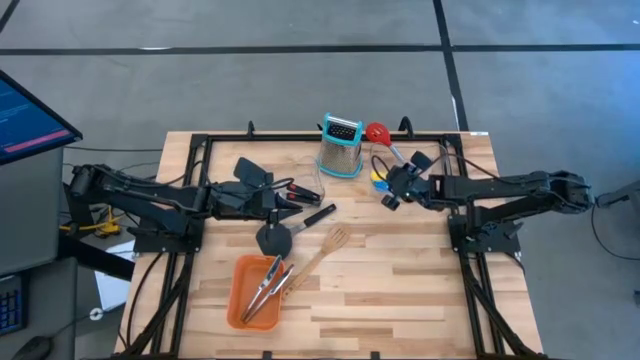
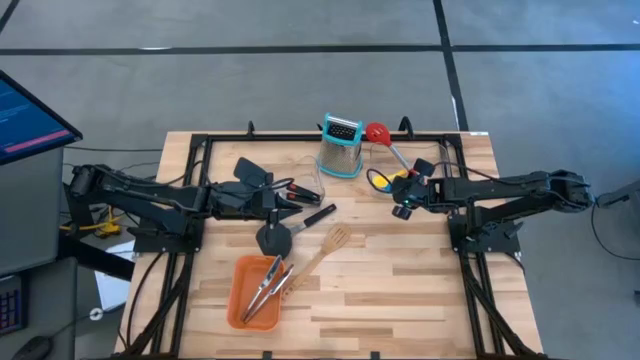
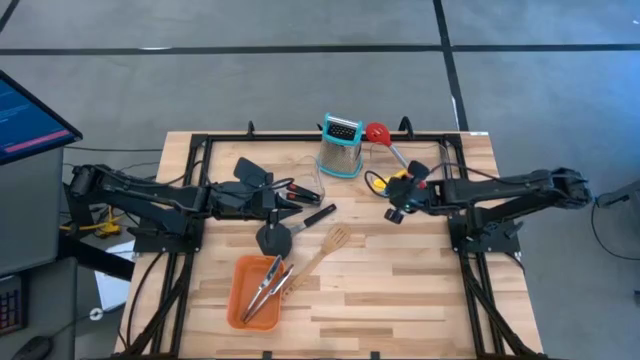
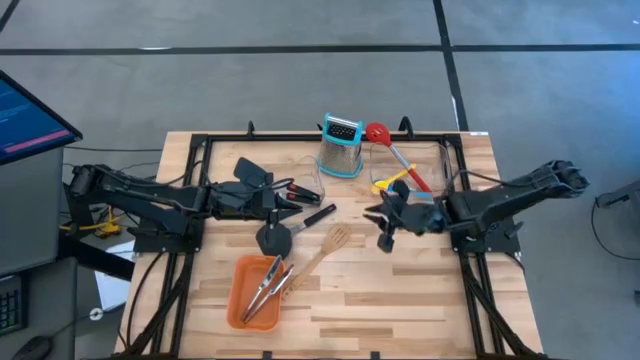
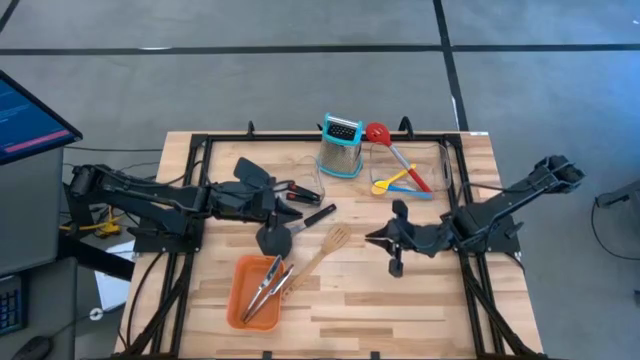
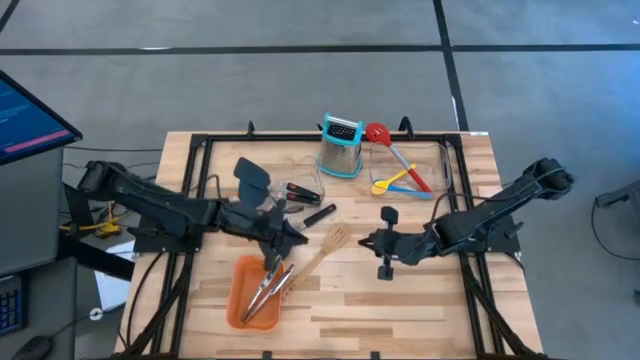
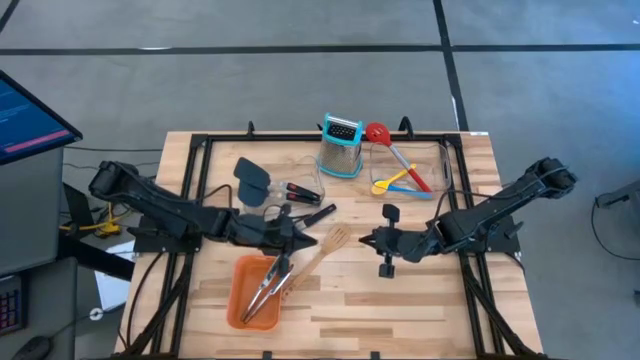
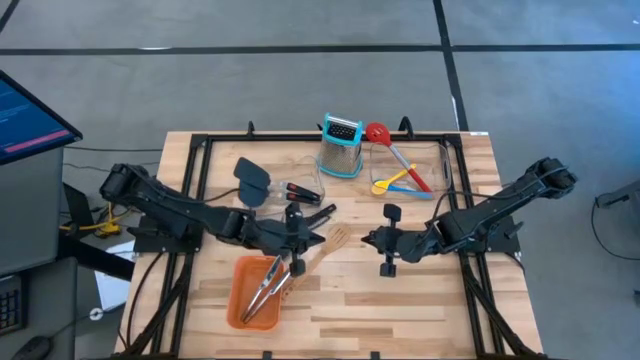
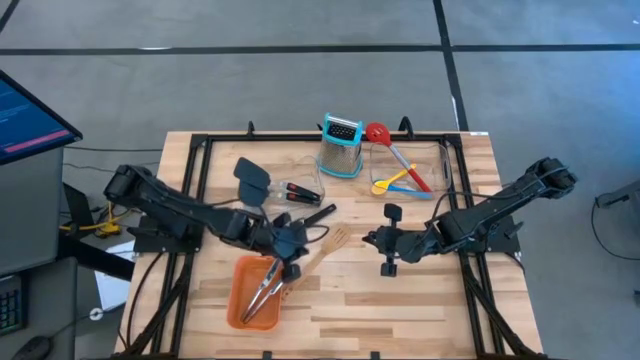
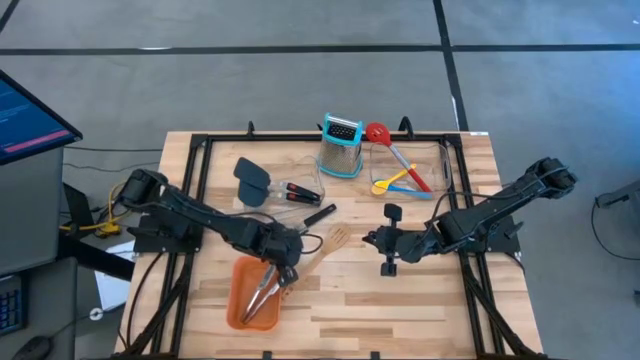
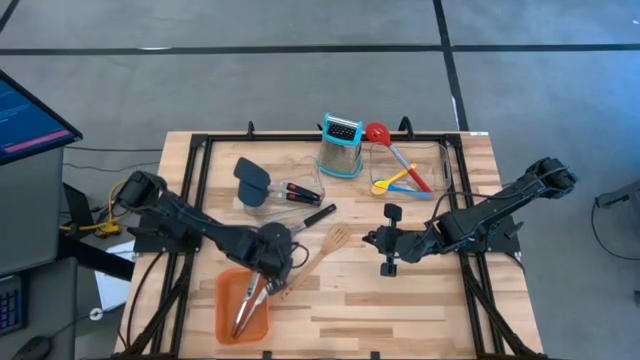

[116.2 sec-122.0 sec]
Task: Pick & Place Kitchen Items
Adjust the orange bin

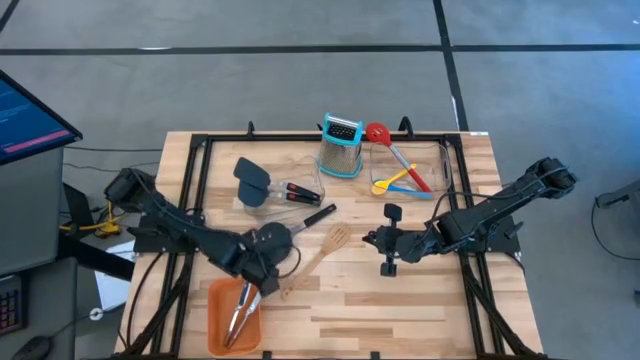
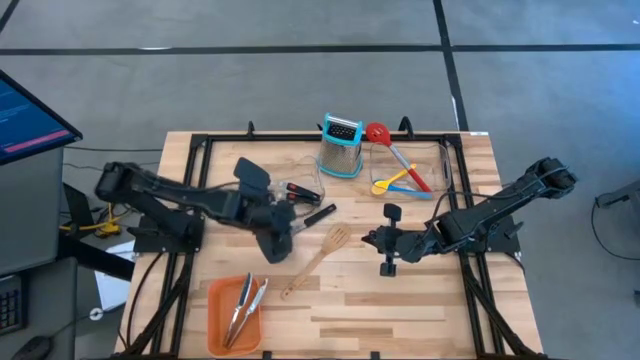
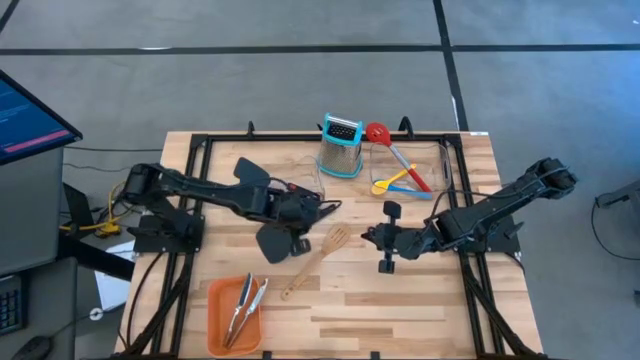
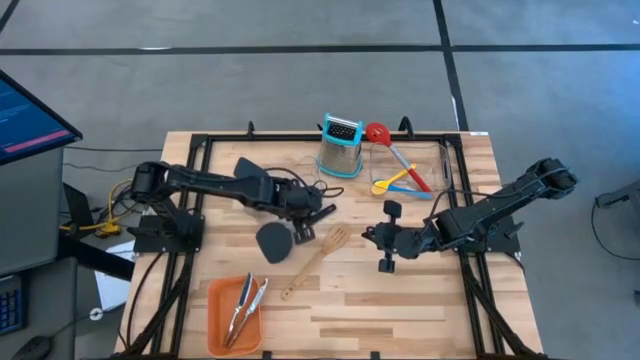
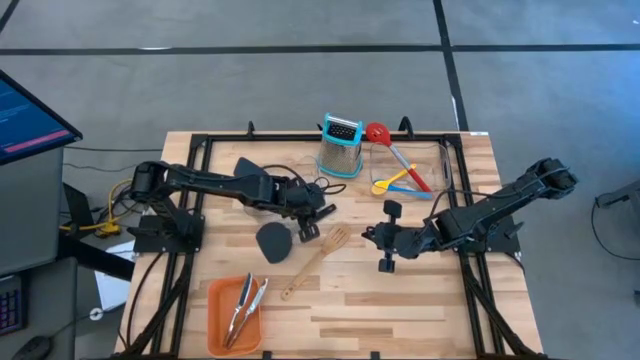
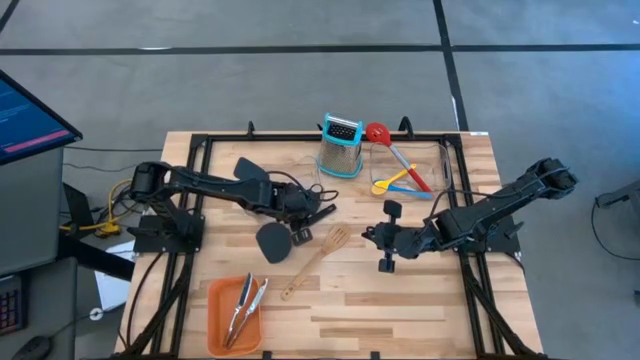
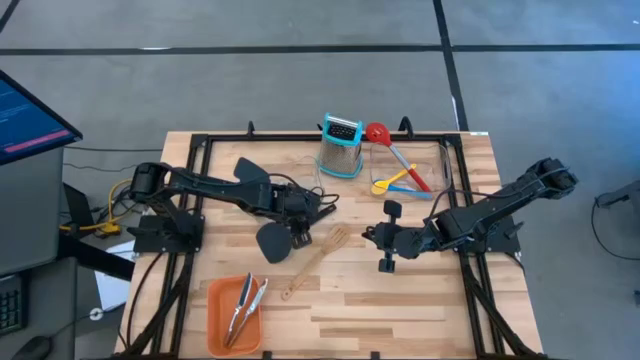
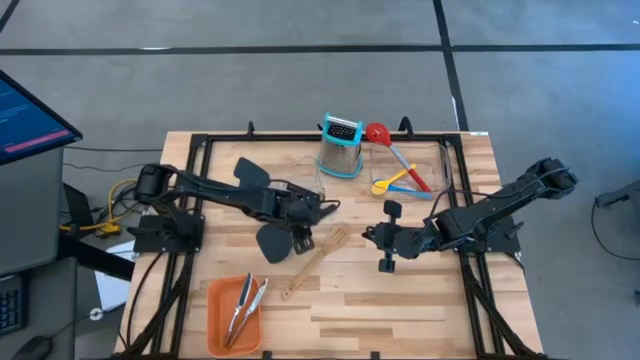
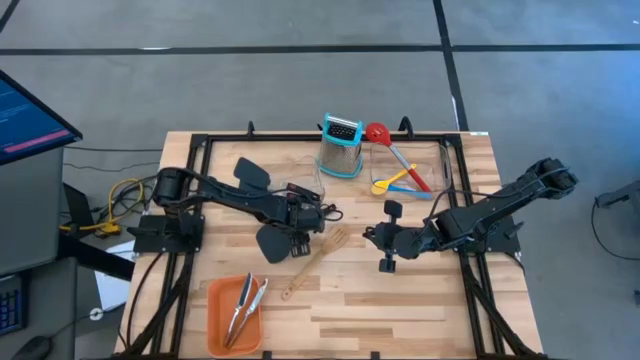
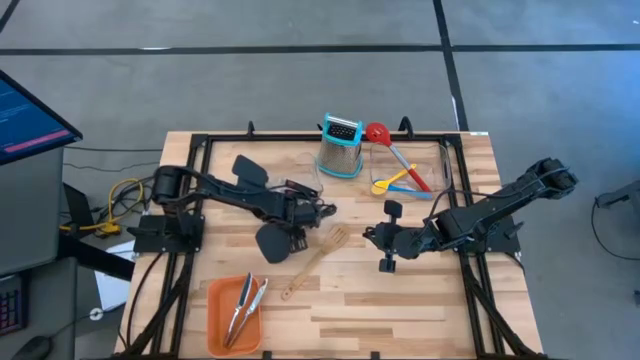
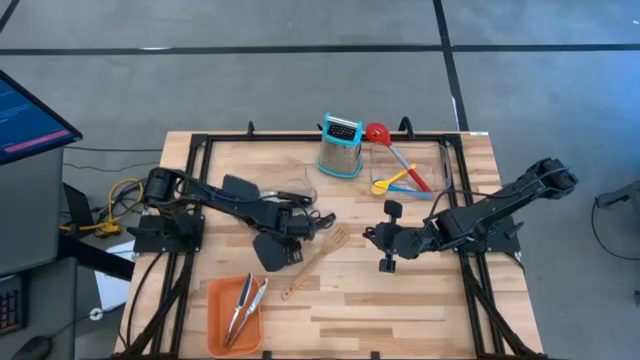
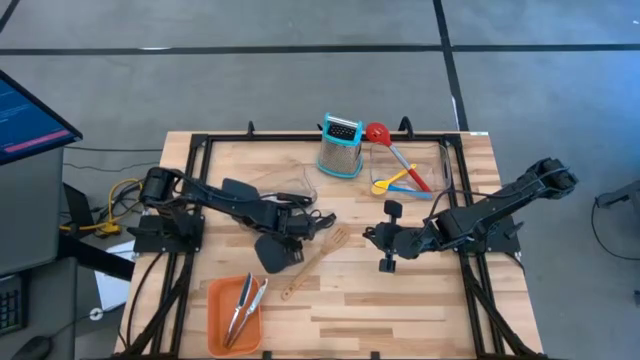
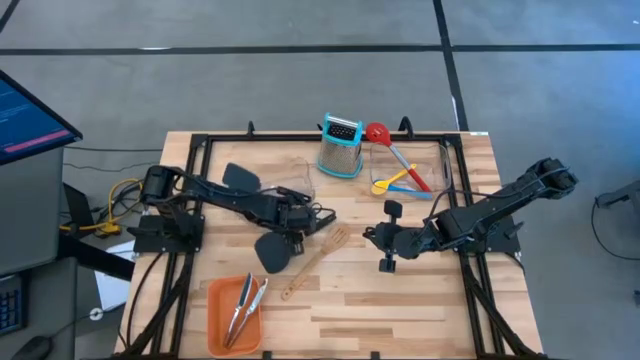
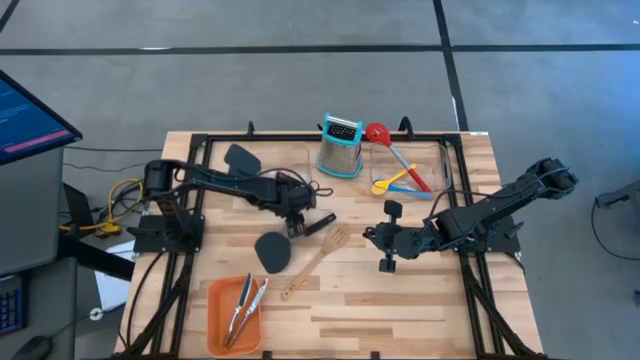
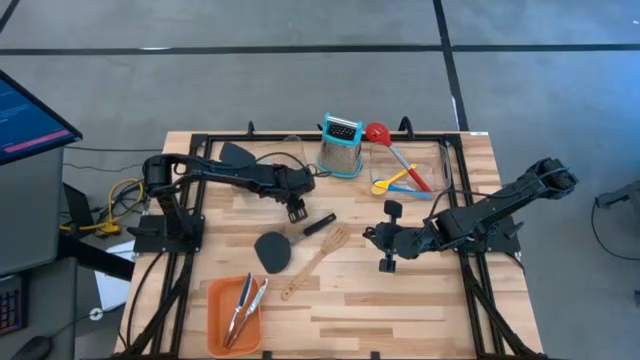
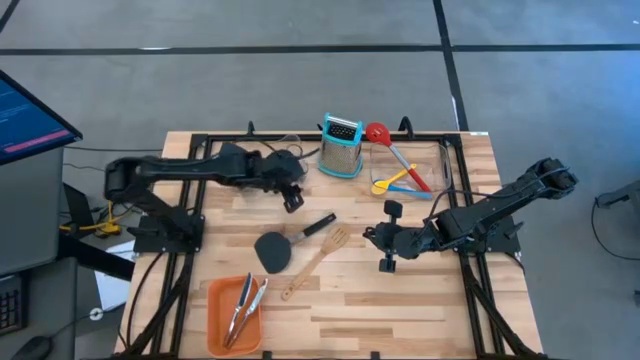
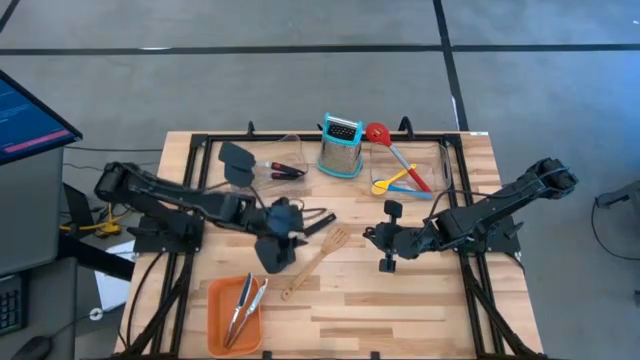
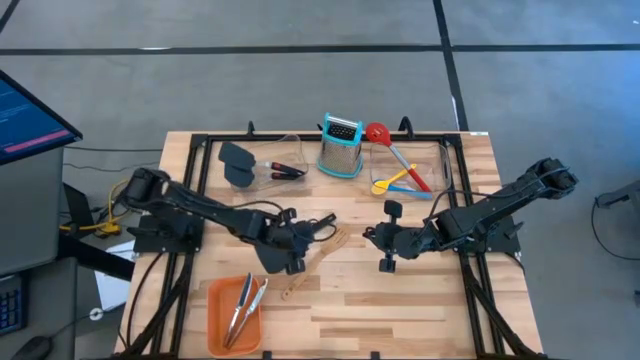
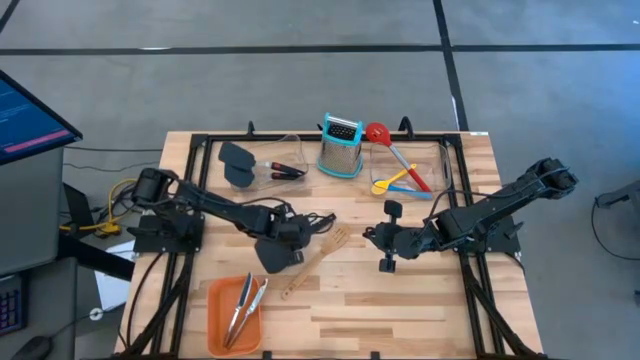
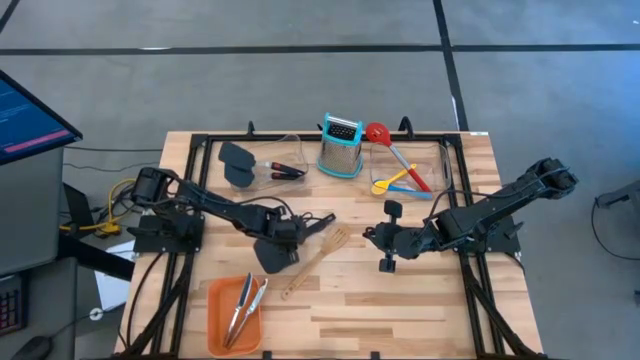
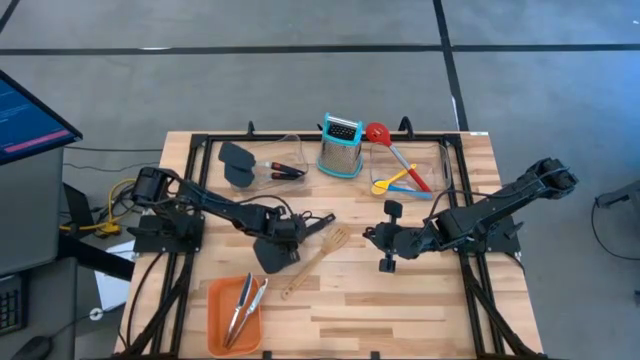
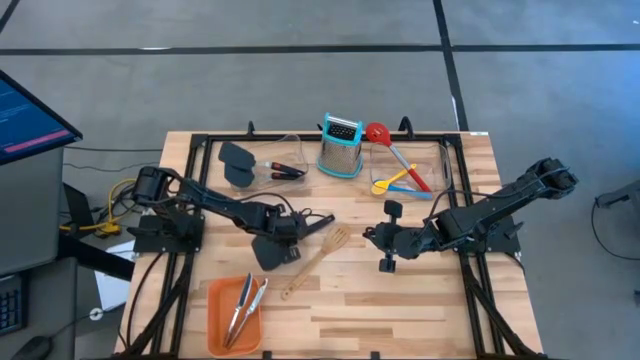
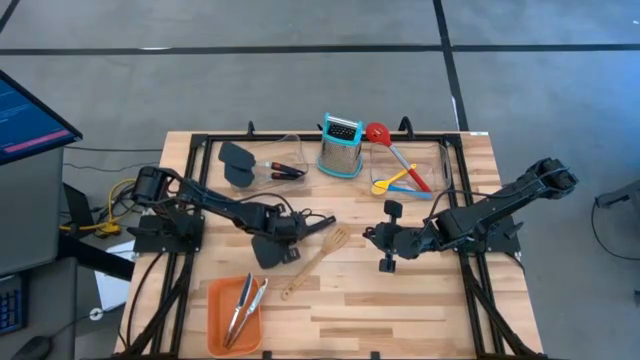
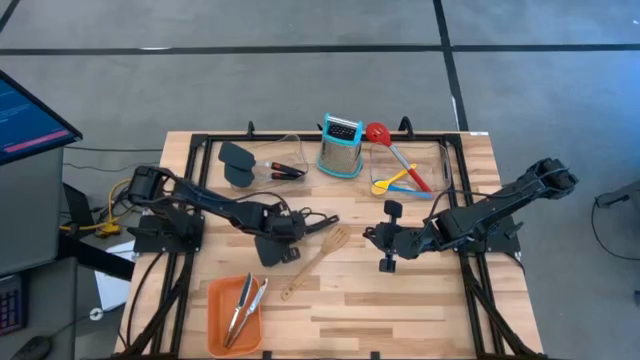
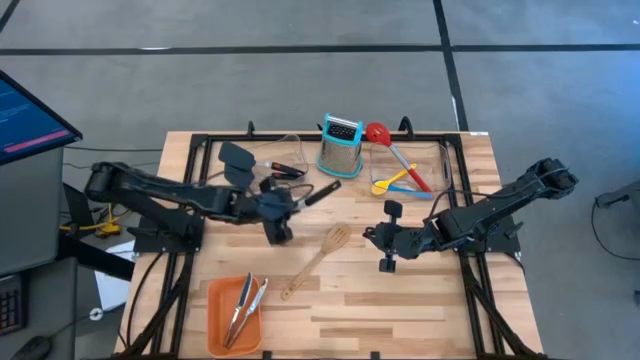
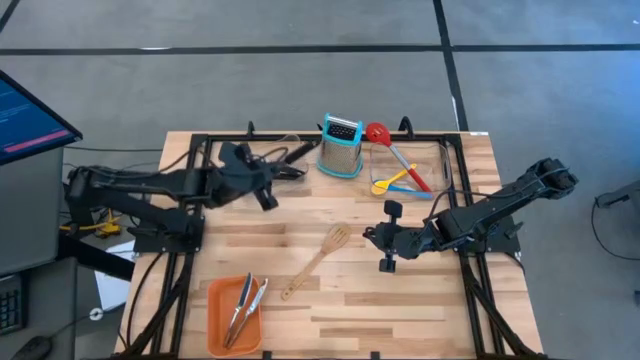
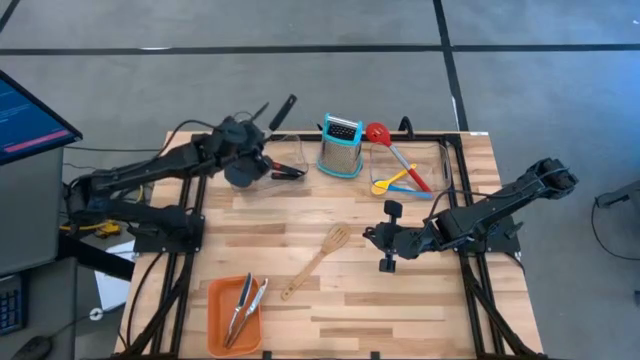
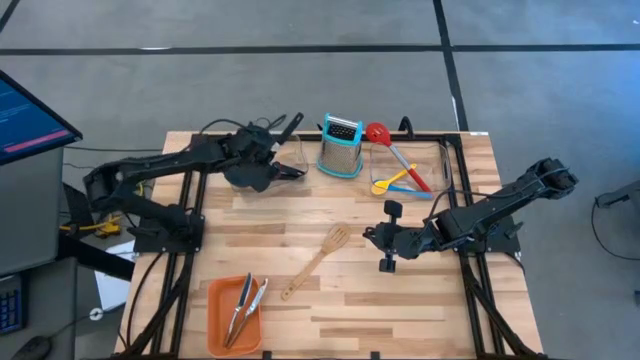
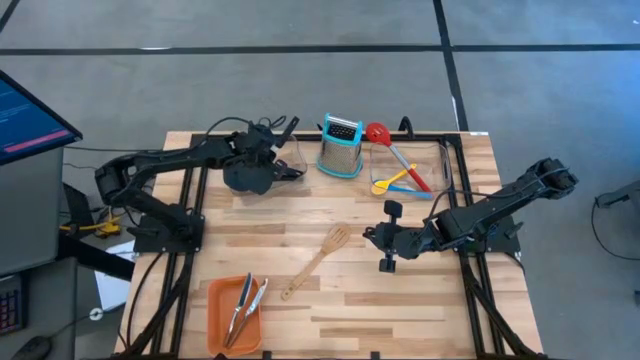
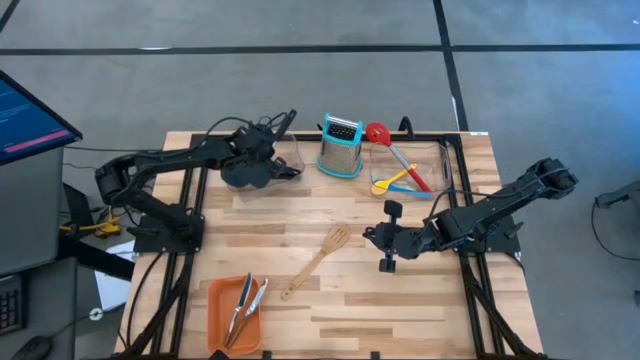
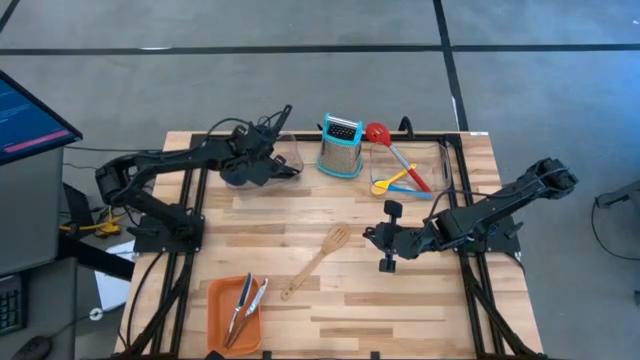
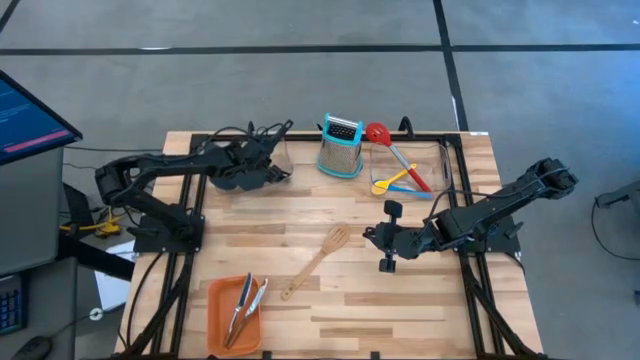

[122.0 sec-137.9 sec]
Put the black spatula into the left transparent bin
